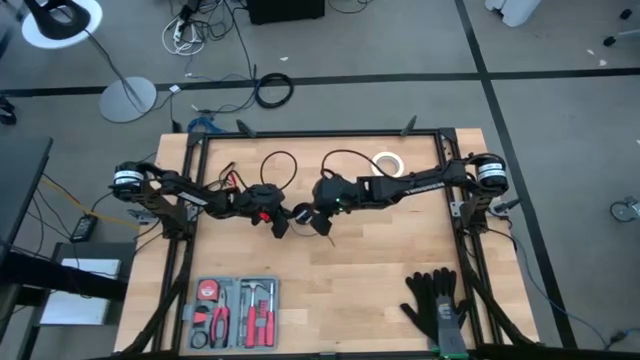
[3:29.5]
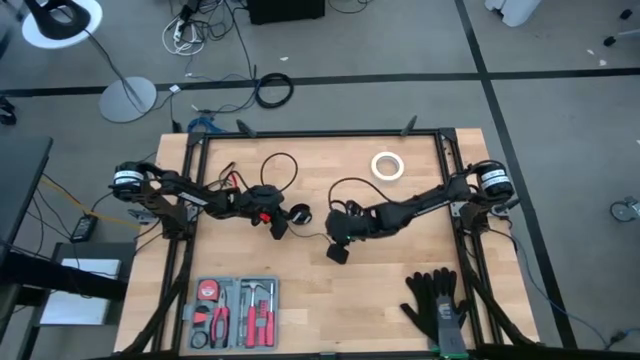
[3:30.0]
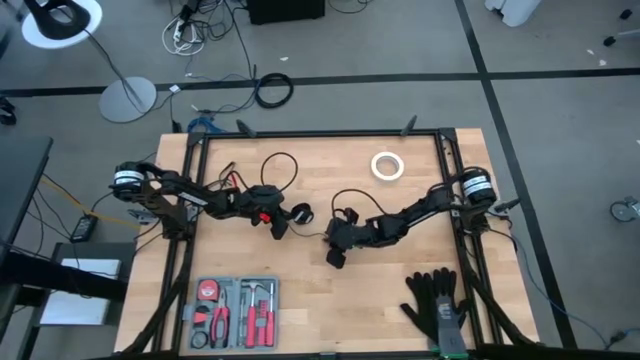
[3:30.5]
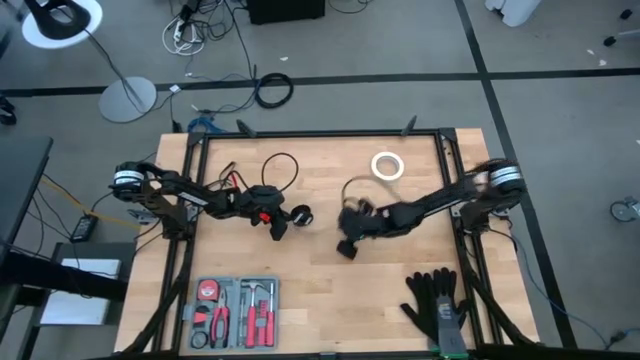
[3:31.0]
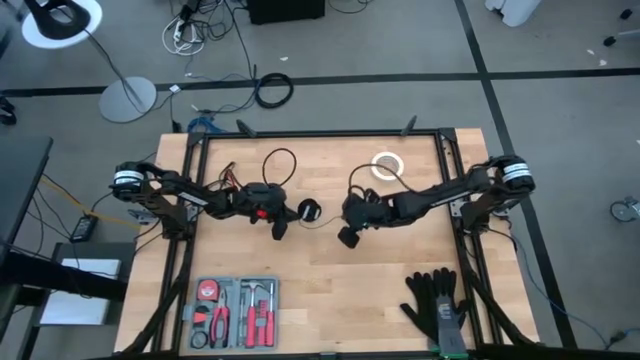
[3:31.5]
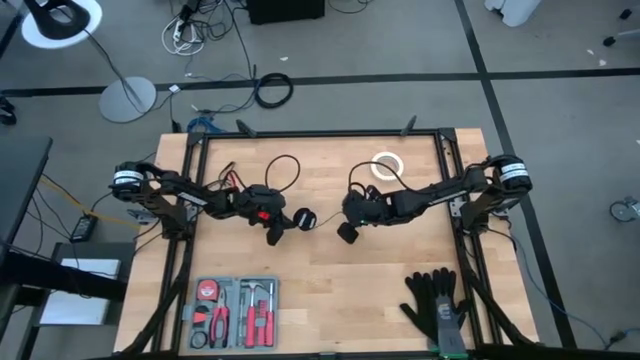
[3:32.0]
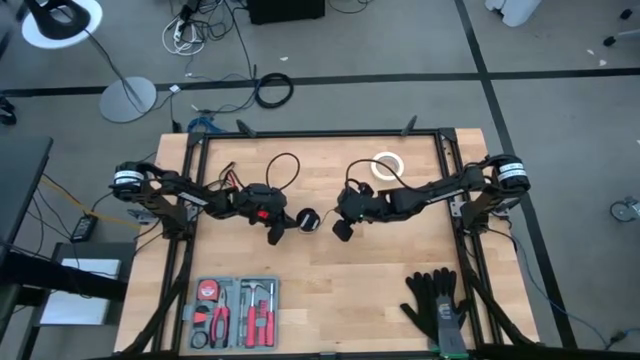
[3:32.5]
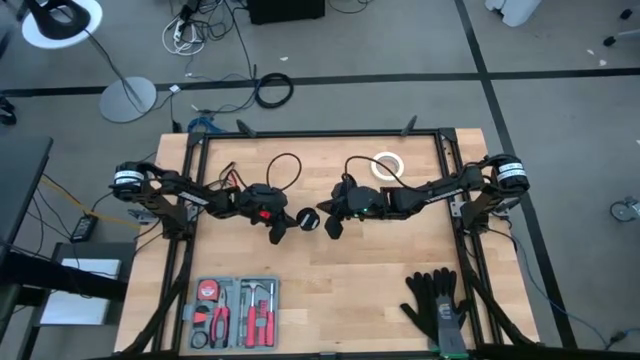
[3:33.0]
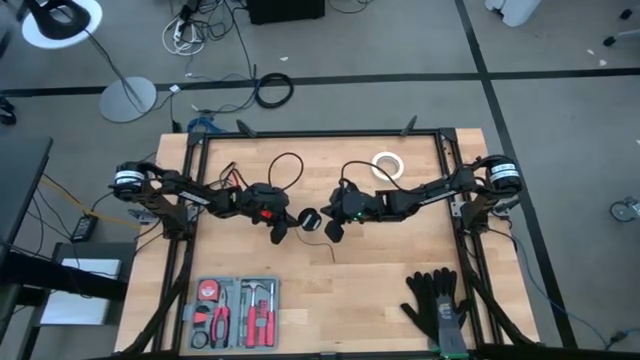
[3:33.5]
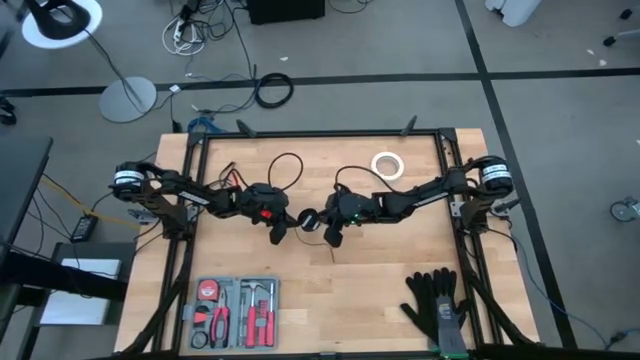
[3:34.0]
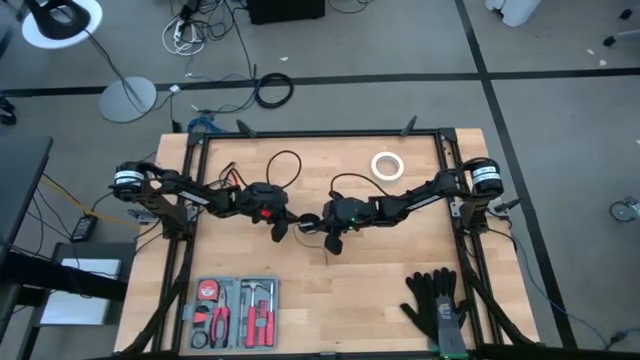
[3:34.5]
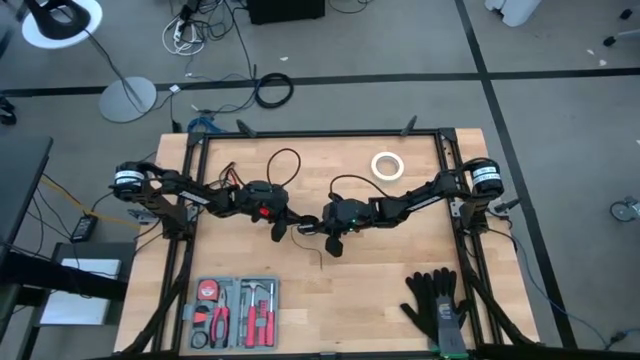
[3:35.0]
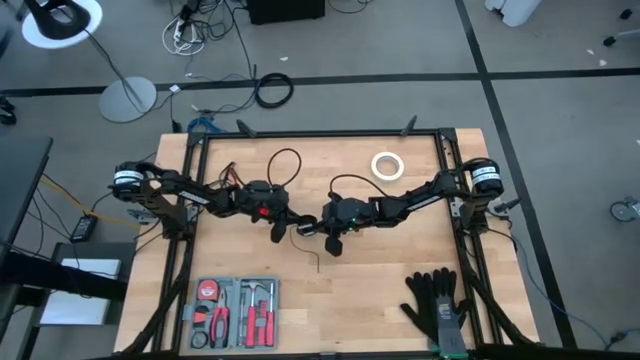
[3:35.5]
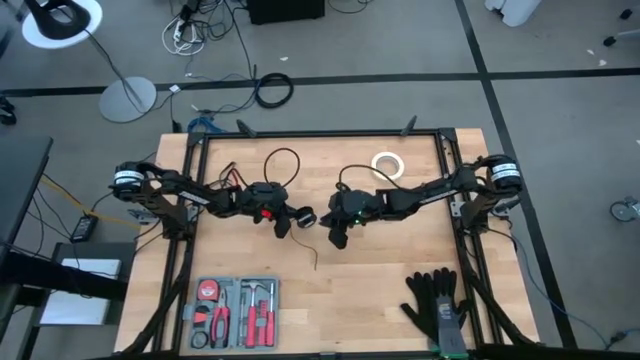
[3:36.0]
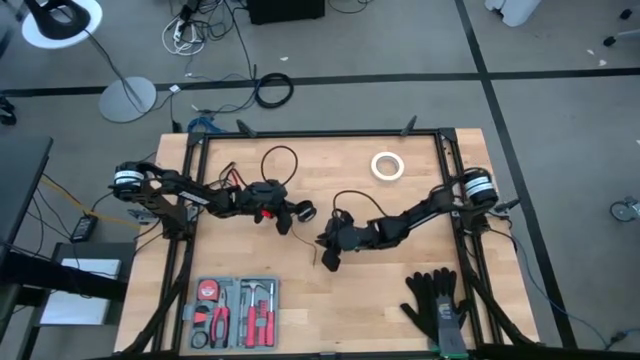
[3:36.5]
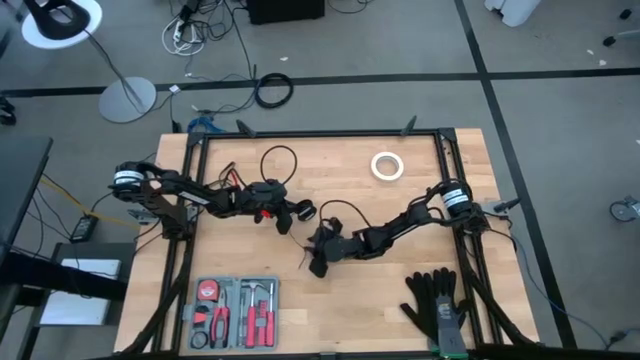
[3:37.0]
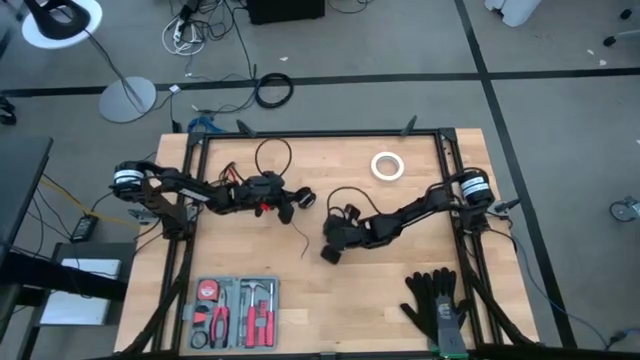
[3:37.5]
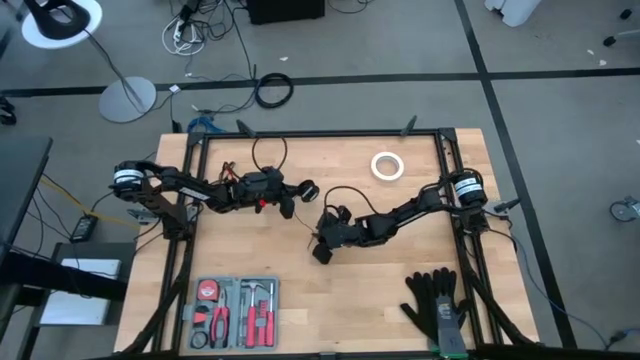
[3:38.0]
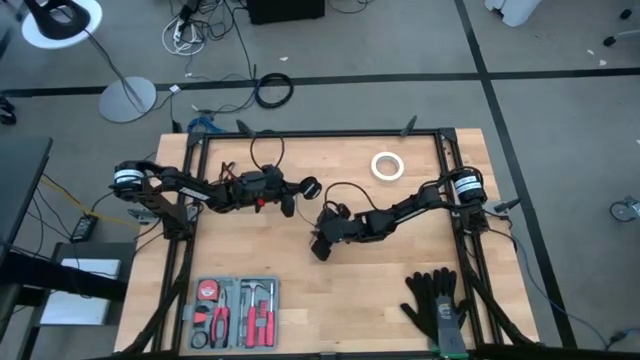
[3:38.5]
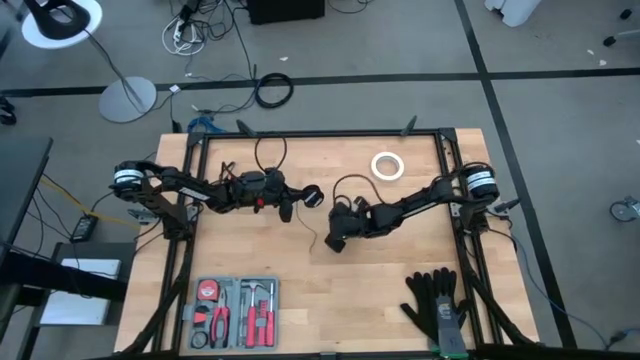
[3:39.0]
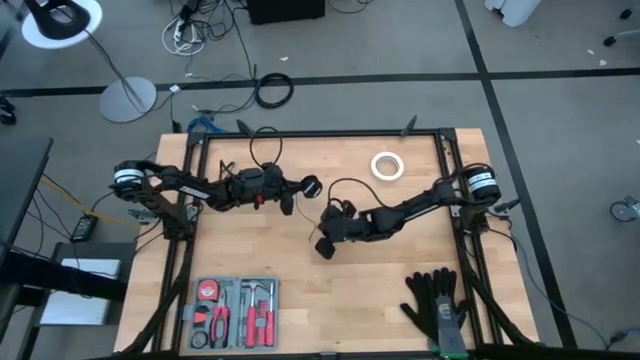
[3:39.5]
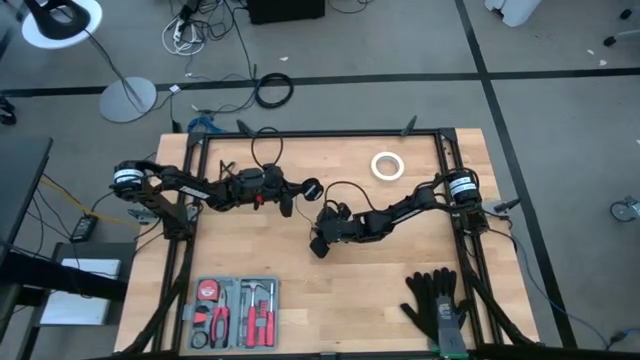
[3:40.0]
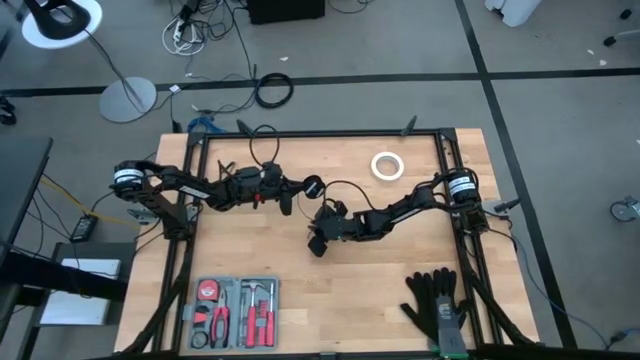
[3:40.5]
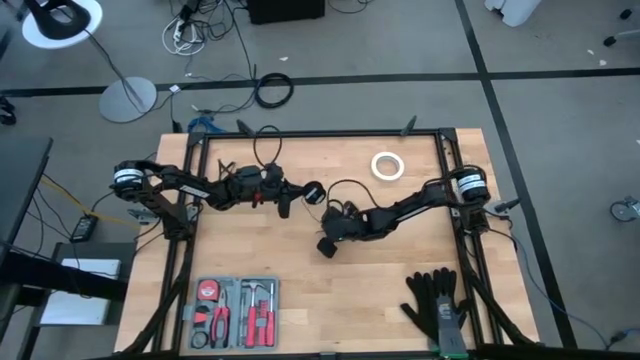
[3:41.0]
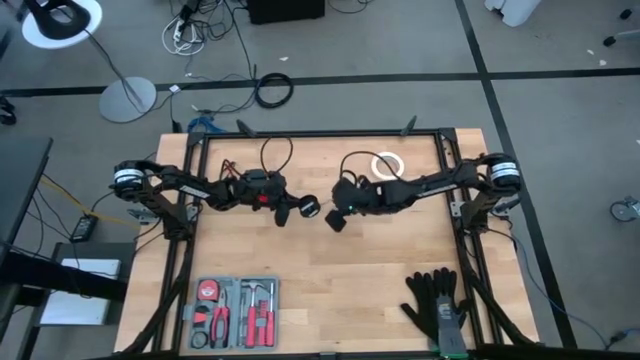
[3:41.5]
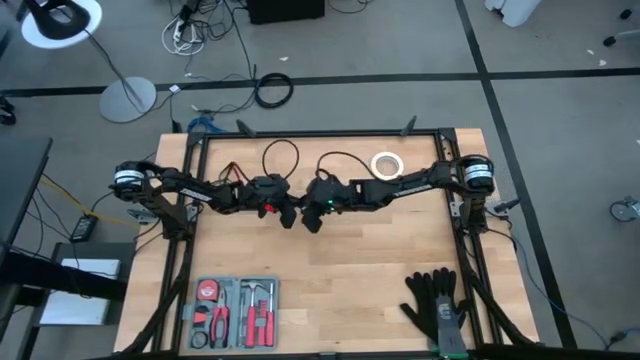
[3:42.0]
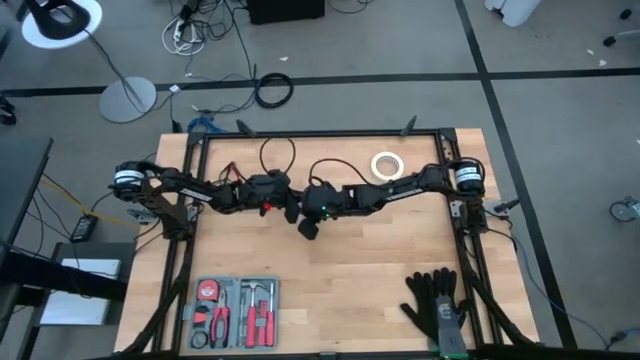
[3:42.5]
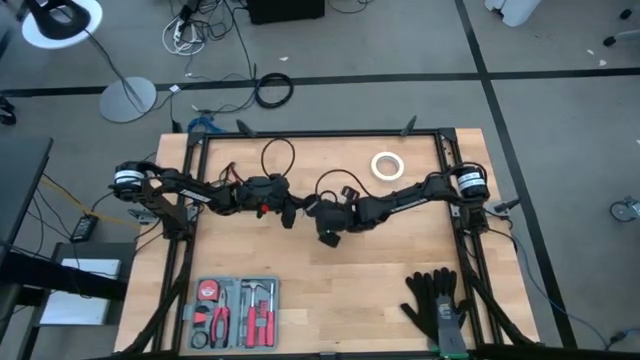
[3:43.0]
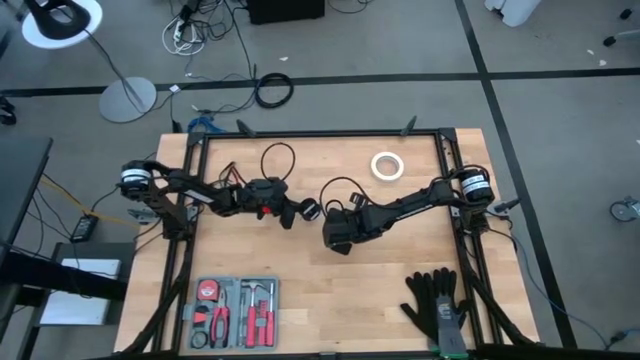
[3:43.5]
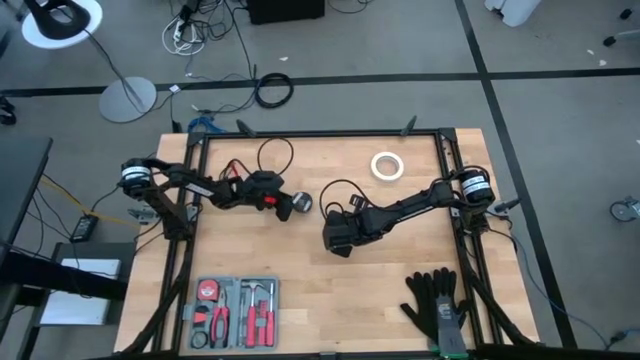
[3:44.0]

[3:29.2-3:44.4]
Task: Coil cords
Coil the black wire on the black spool

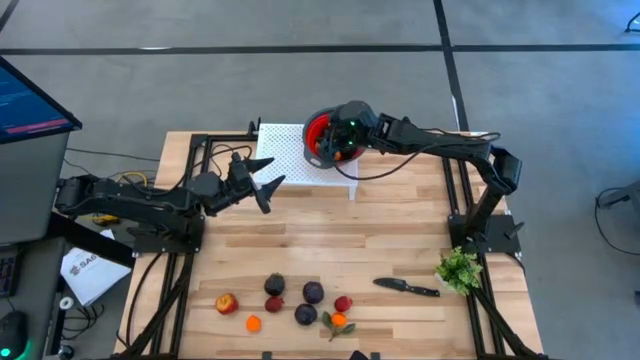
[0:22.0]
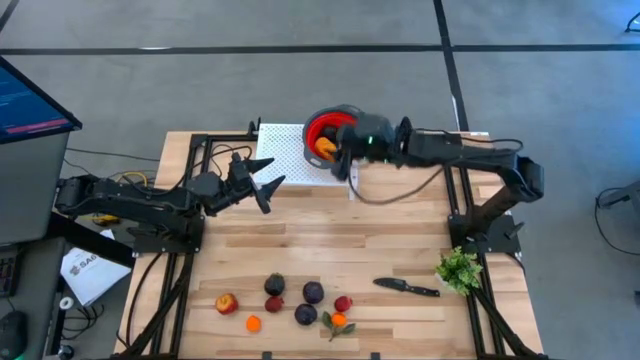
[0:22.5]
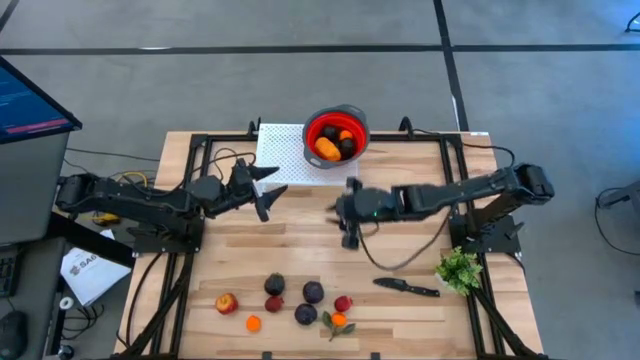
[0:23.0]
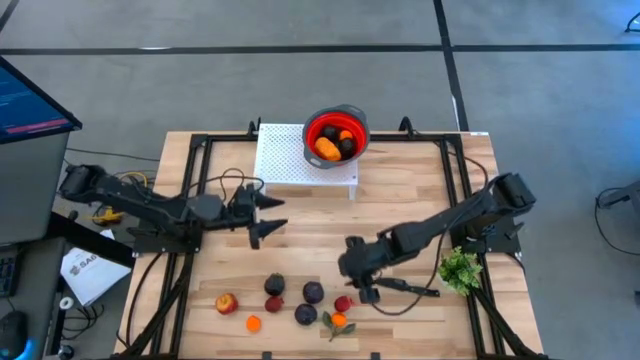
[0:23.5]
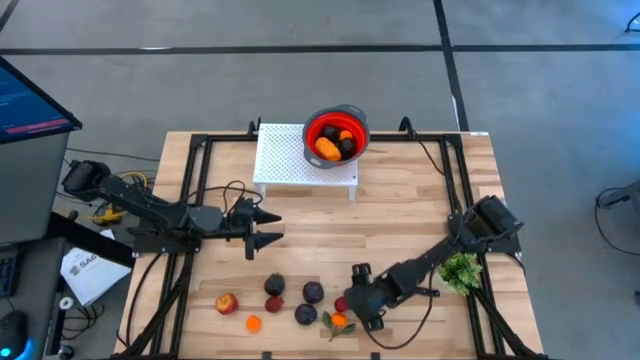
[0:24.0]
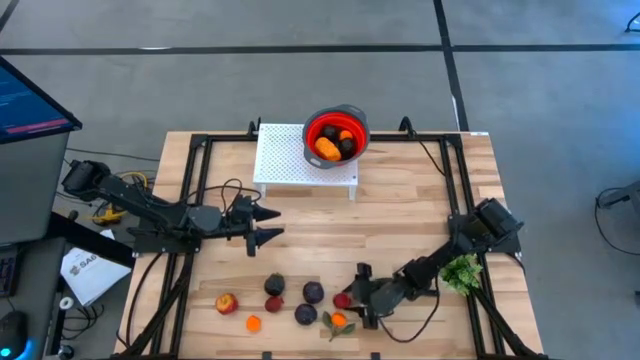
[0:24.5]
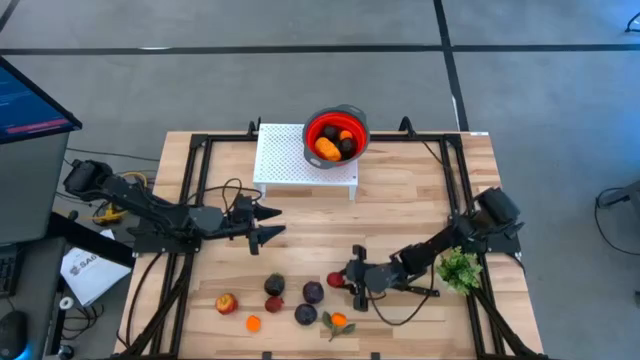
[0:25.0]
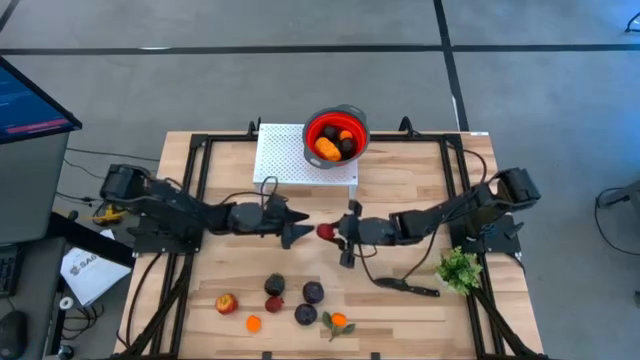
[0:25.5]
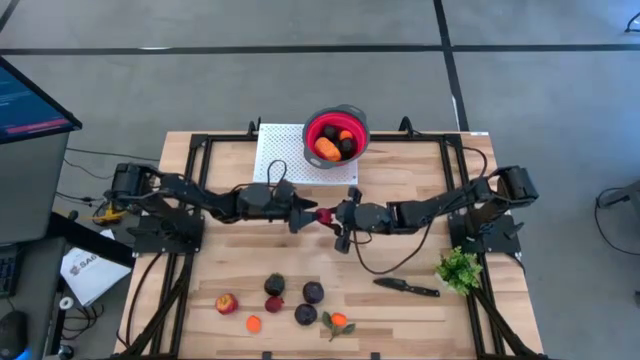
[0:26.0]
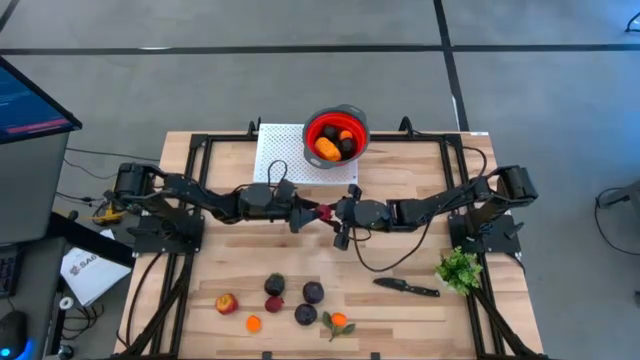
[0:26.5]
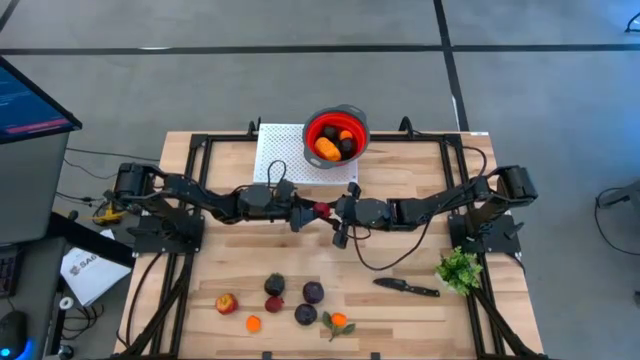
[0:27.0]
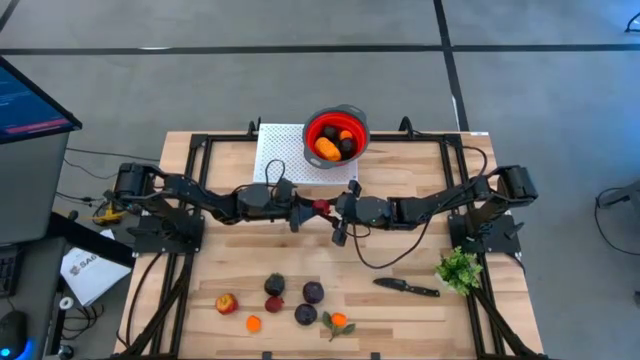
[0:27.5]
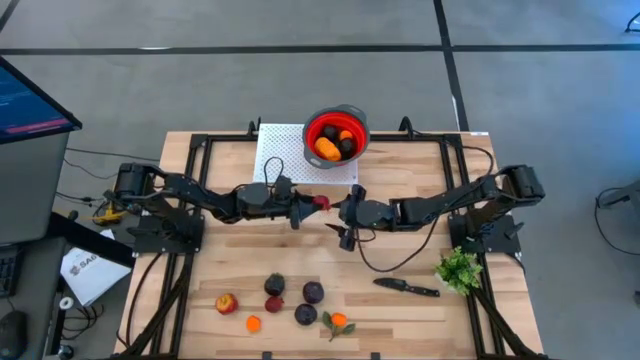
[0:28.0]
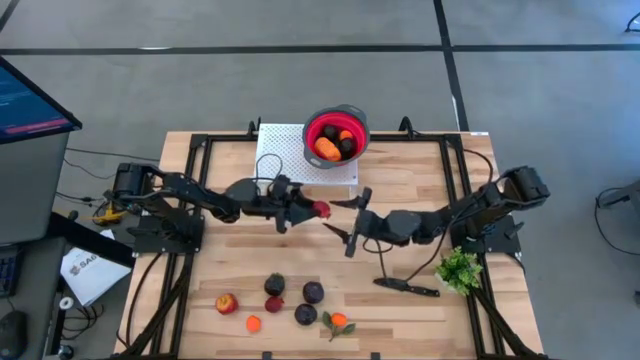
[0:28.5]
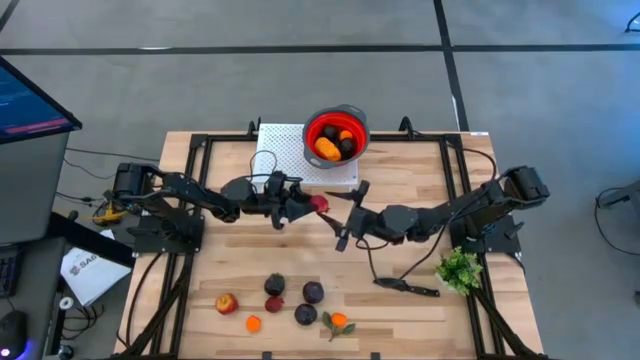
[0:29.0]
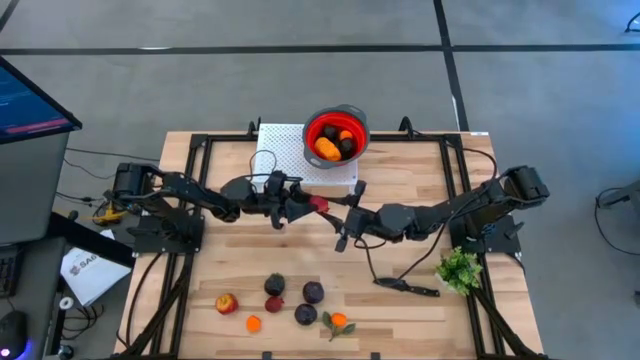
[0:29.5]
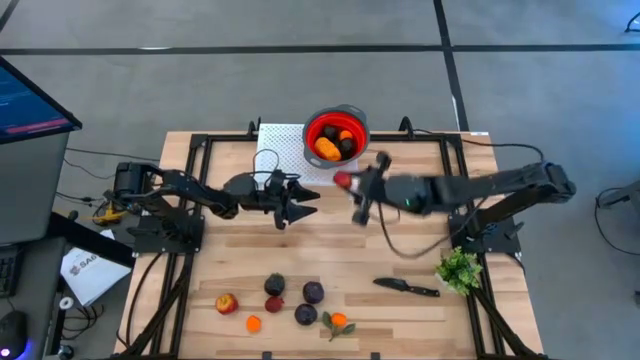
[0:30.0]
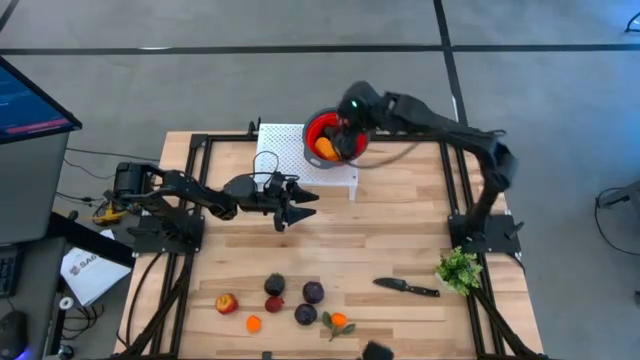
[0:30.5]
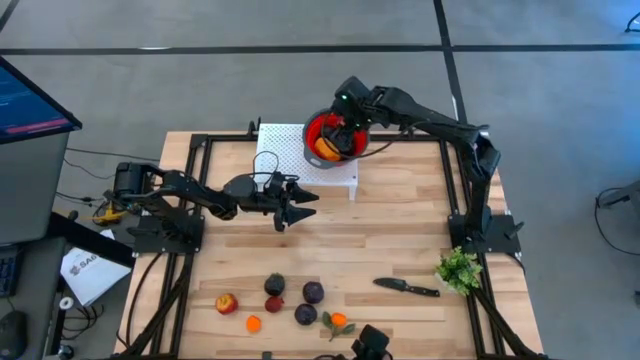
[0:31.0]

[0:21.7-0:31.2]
Task: Pick & Place Fruit
Put the pomegranate into the red strainer on the shelf
